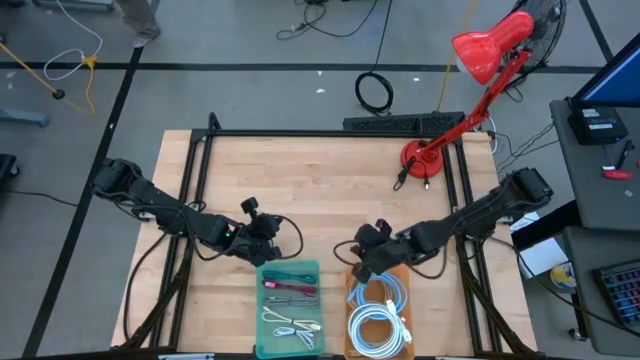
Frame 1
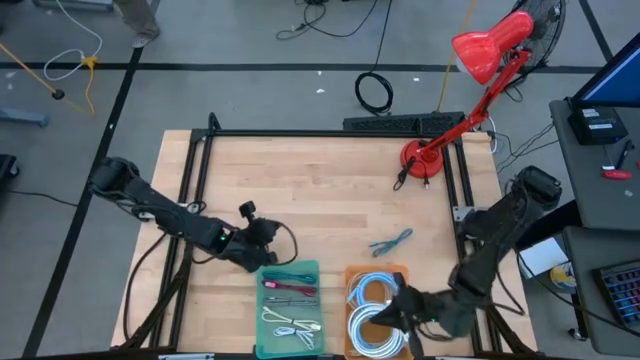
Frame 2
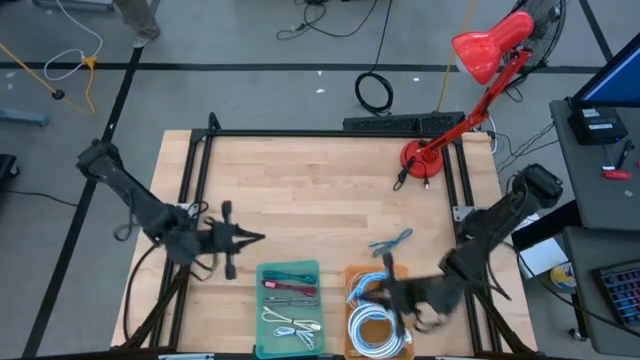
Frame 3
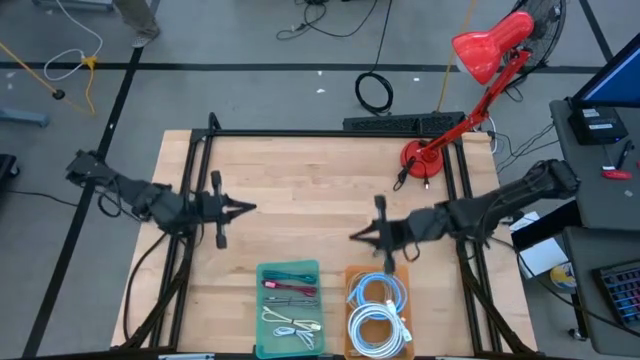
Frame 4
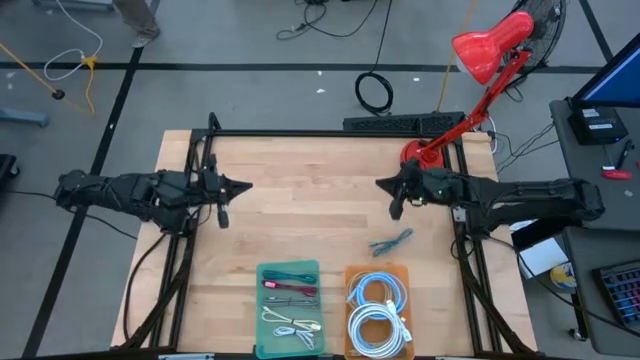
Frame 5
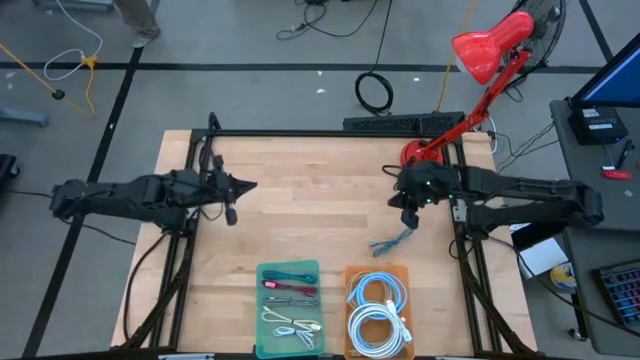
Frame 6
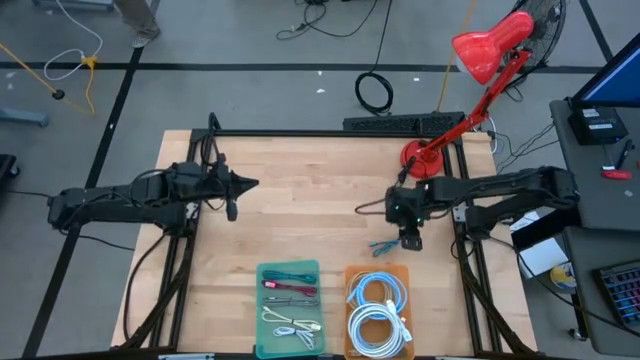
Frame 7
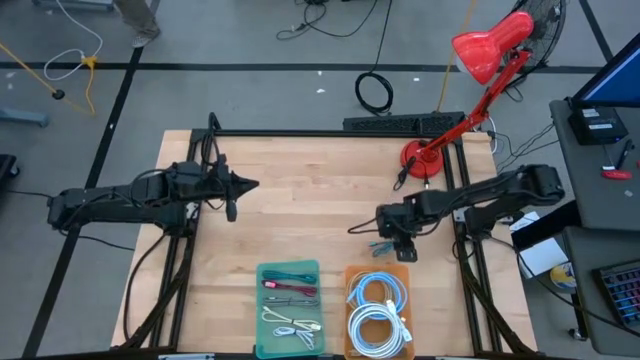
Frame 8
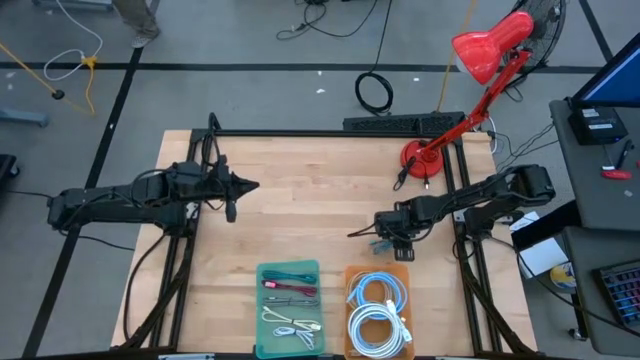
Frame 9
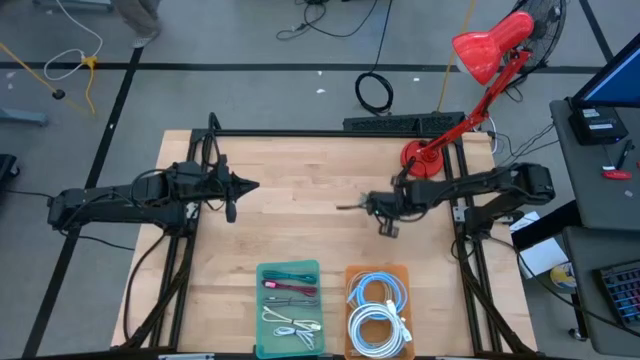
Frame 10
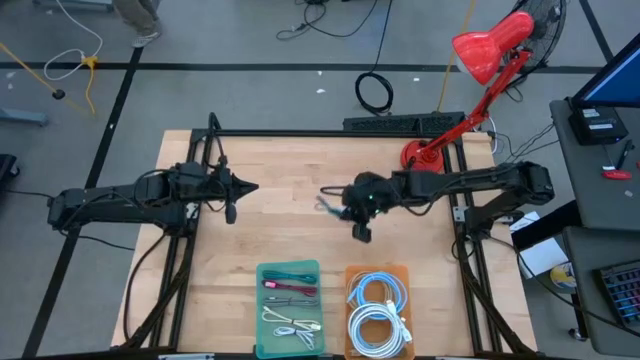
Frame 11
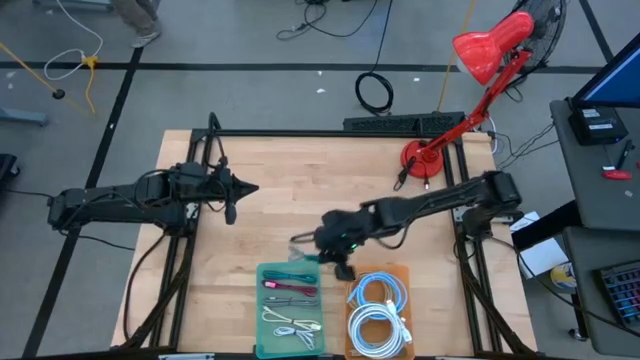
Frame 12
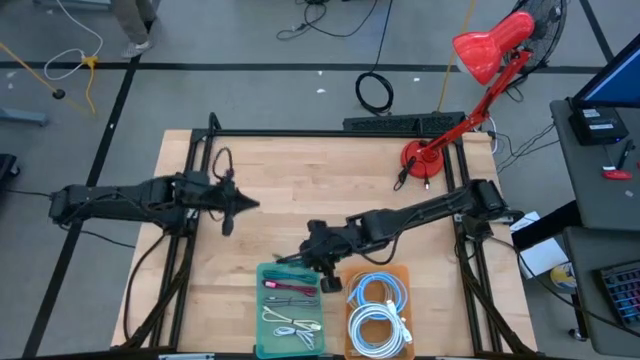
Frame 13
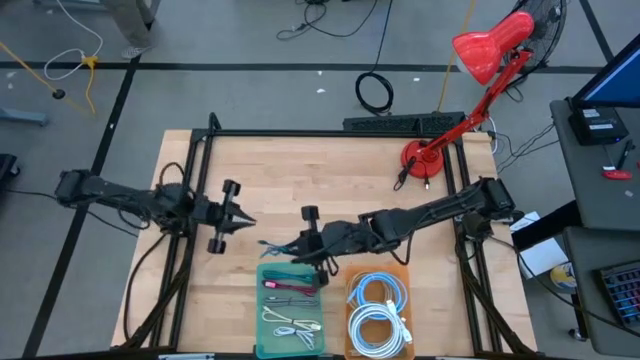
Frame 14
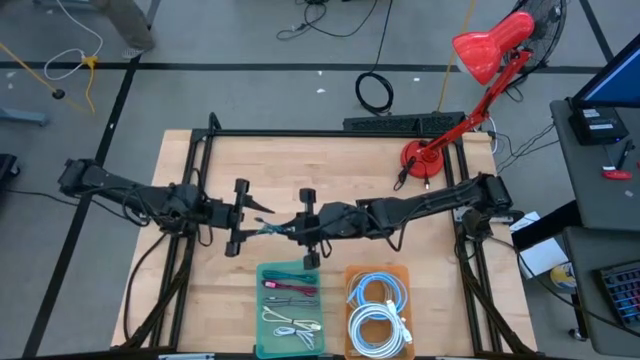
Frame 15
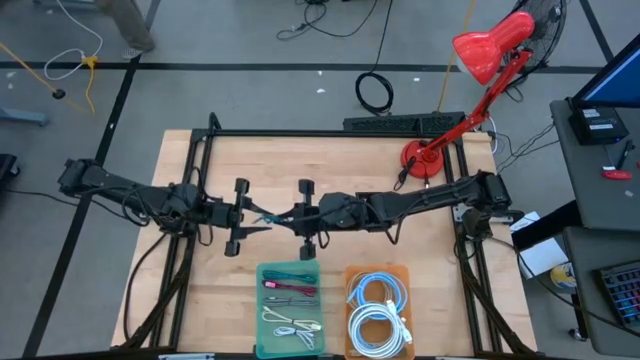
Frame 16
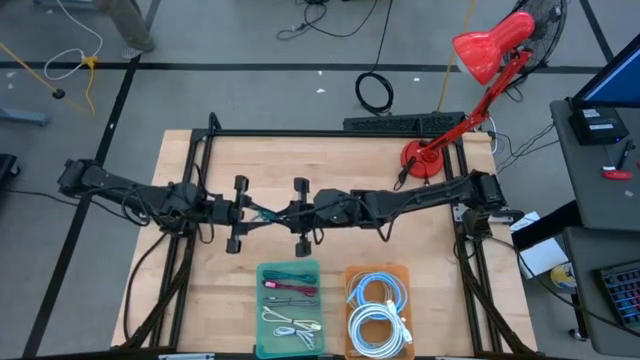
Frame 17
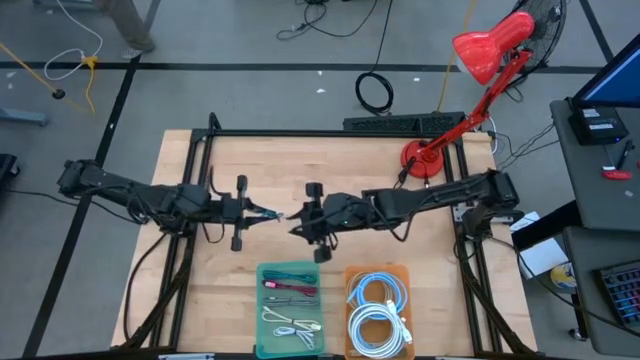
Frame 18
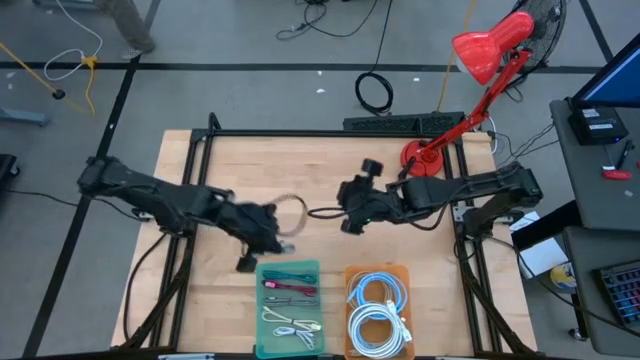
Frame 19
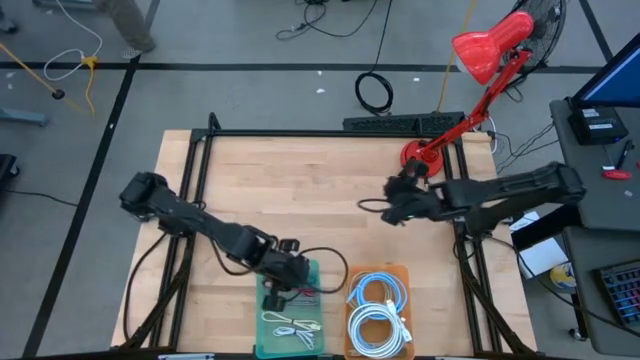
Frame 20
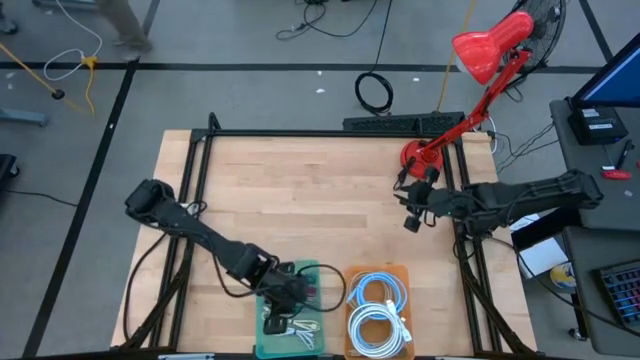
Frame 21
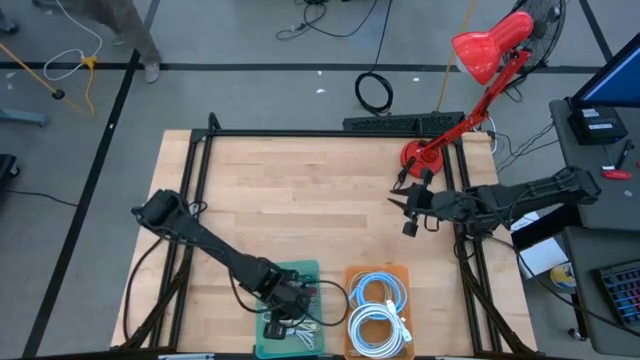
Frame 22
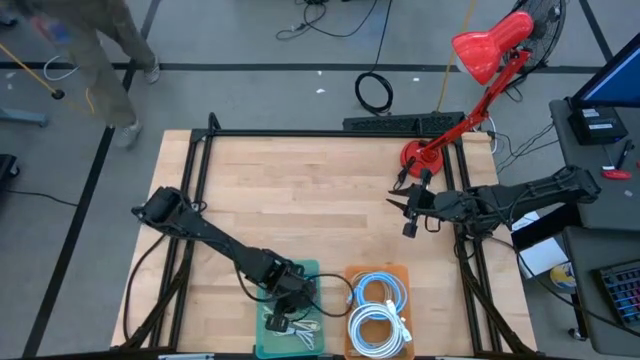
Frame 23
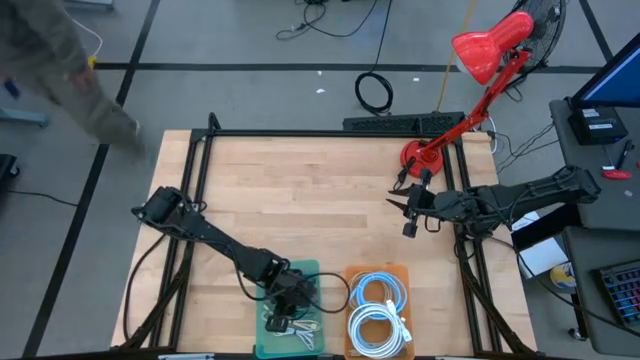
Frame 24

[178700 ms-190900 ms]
Task: Pick & Place USB Port
Put the blue charger cable into the green bin

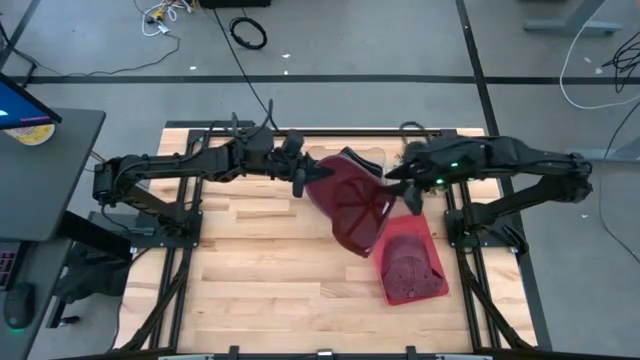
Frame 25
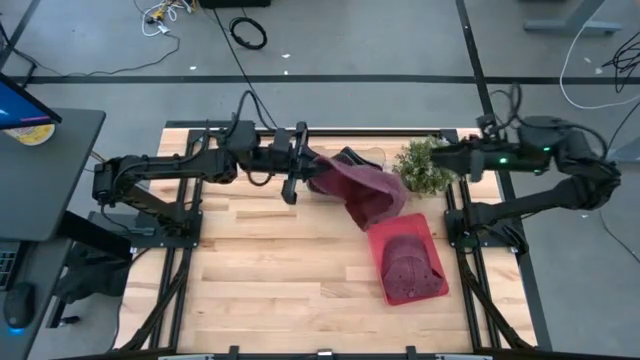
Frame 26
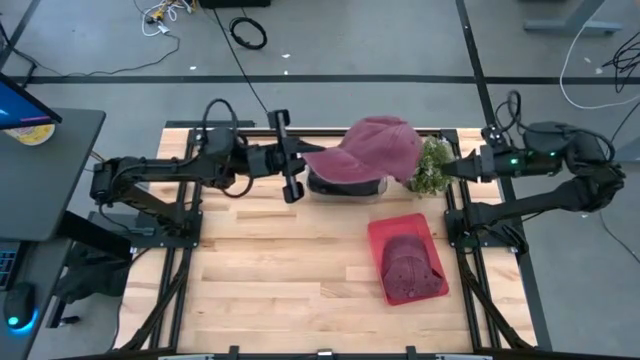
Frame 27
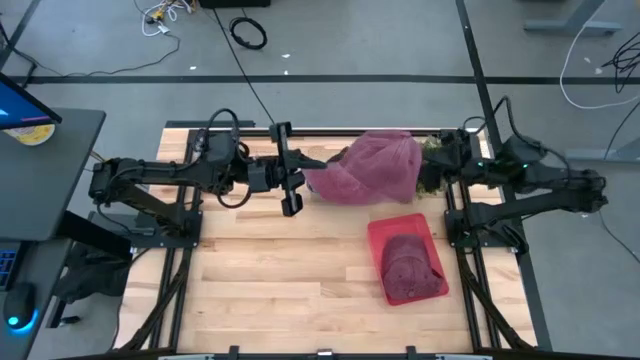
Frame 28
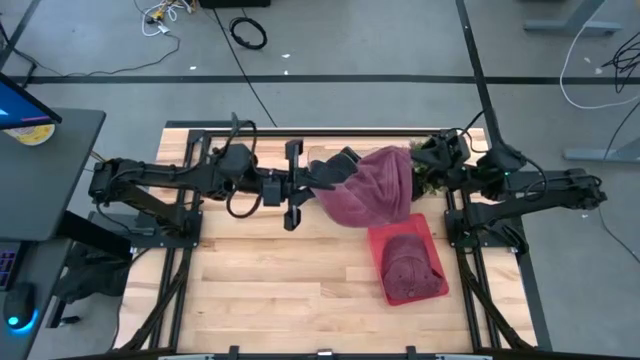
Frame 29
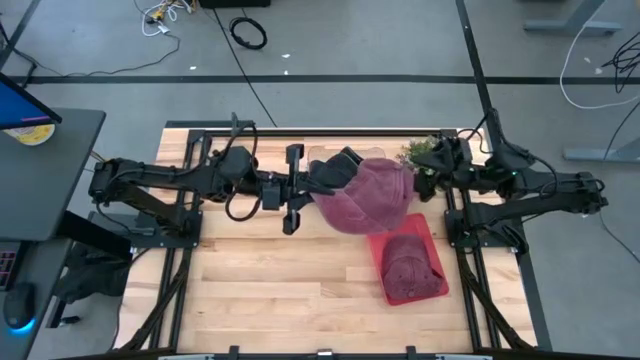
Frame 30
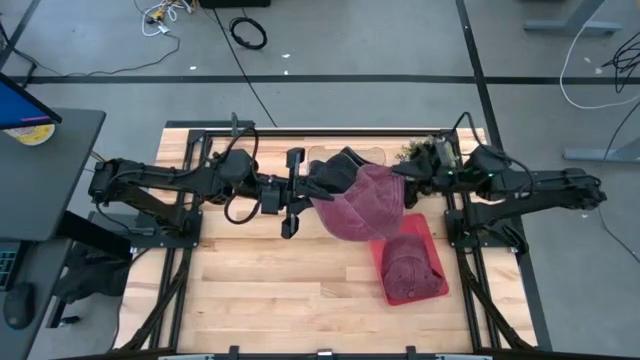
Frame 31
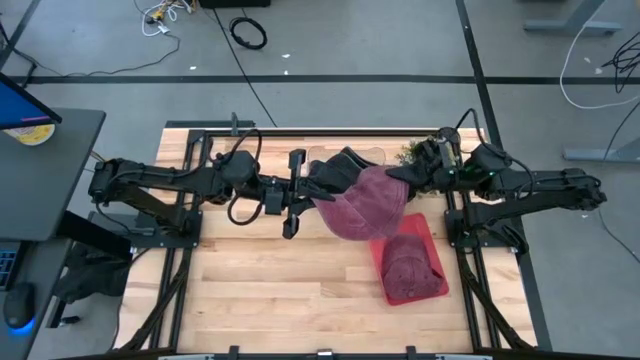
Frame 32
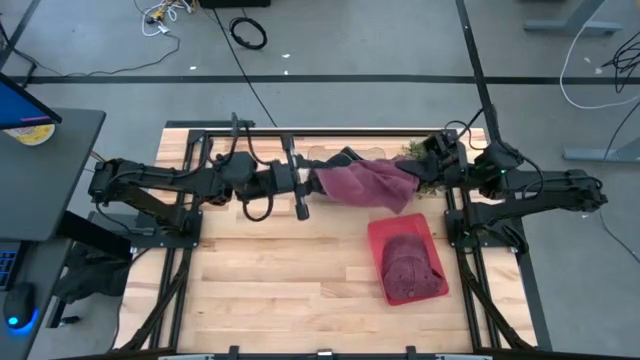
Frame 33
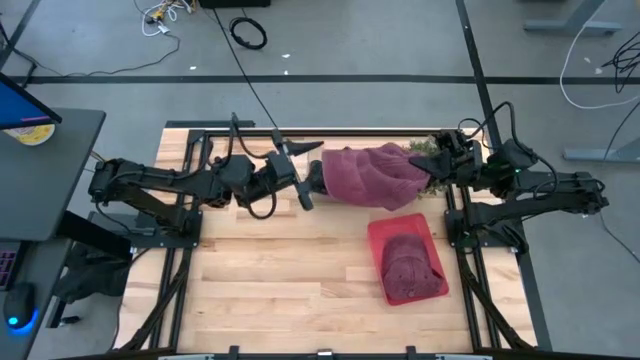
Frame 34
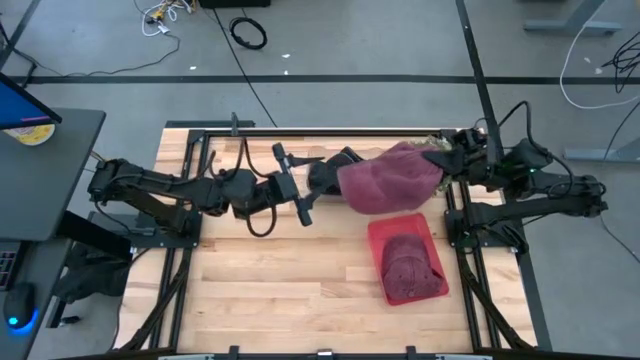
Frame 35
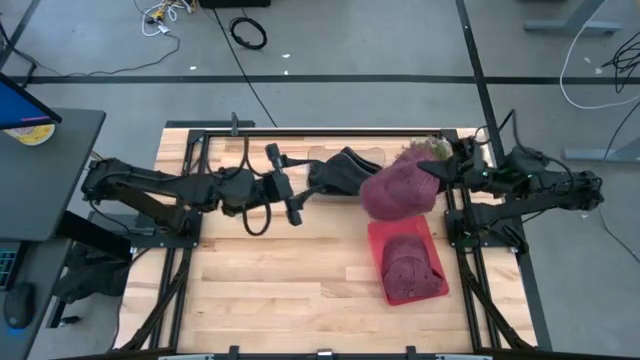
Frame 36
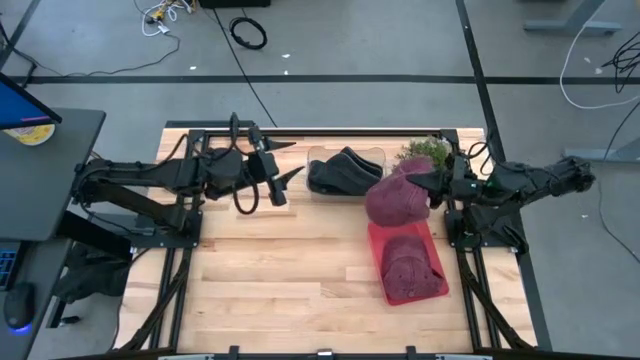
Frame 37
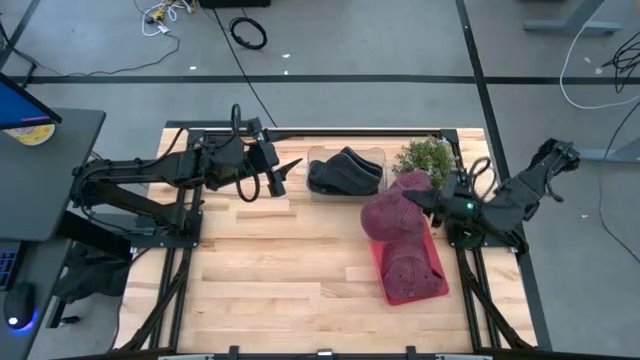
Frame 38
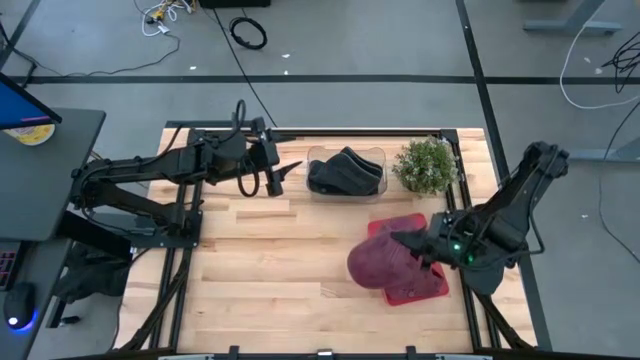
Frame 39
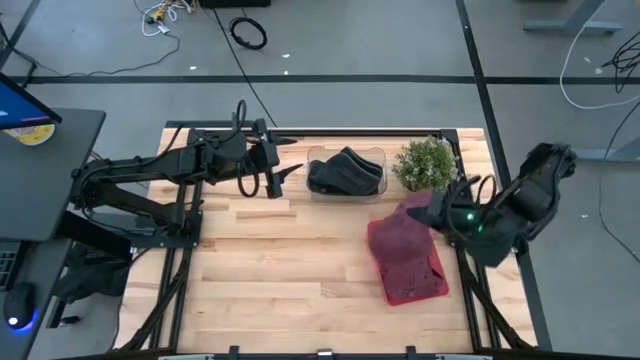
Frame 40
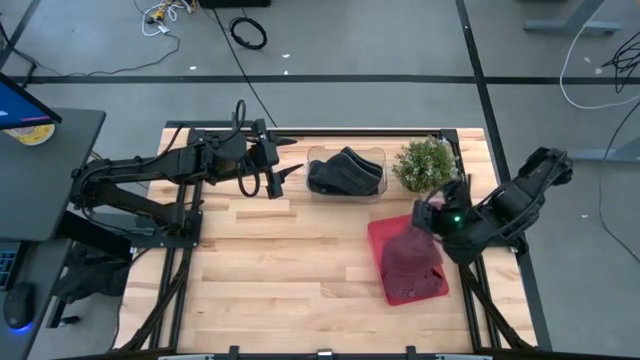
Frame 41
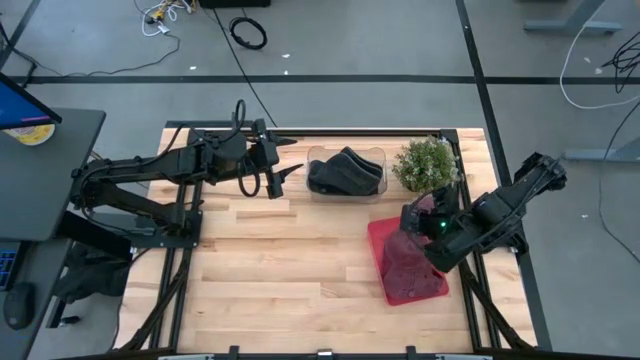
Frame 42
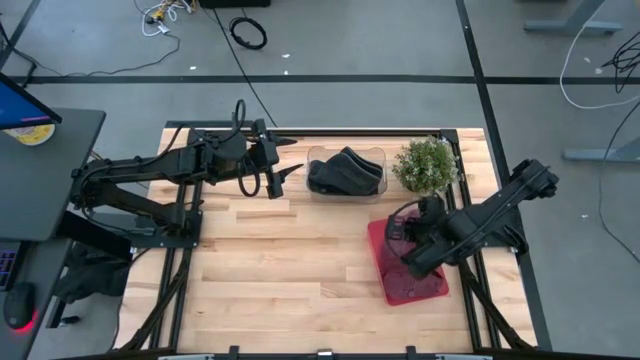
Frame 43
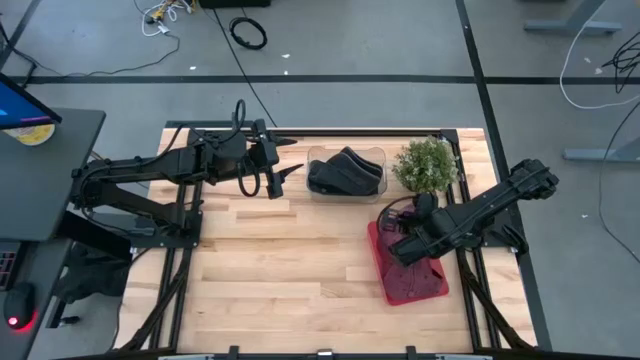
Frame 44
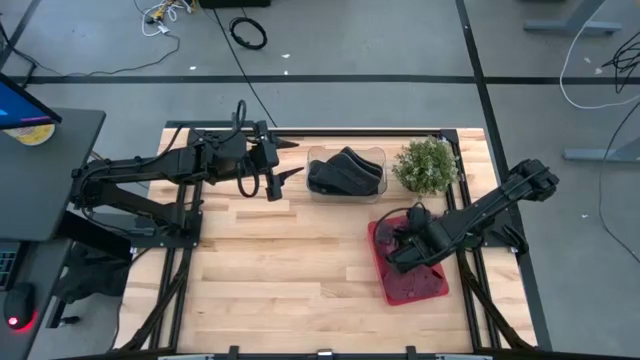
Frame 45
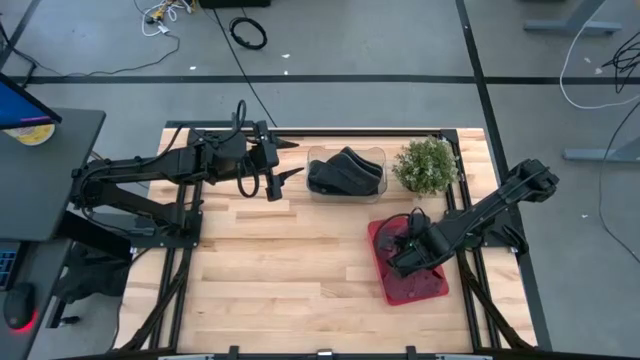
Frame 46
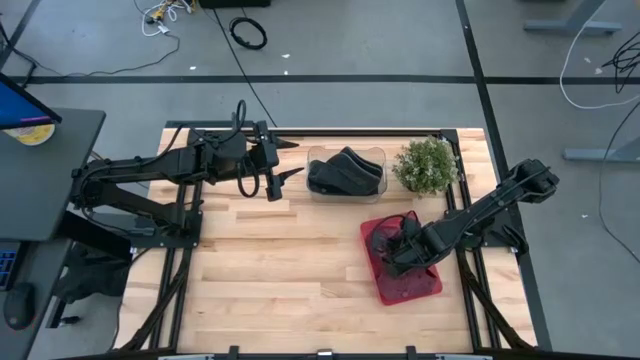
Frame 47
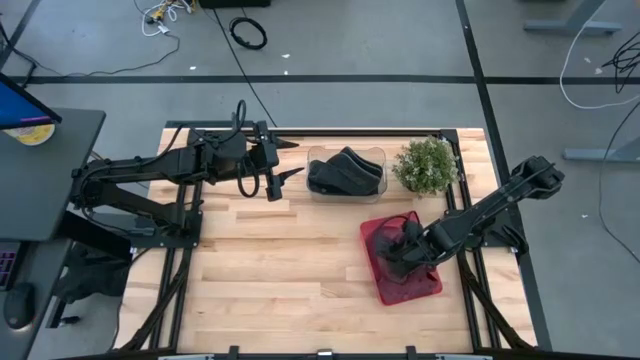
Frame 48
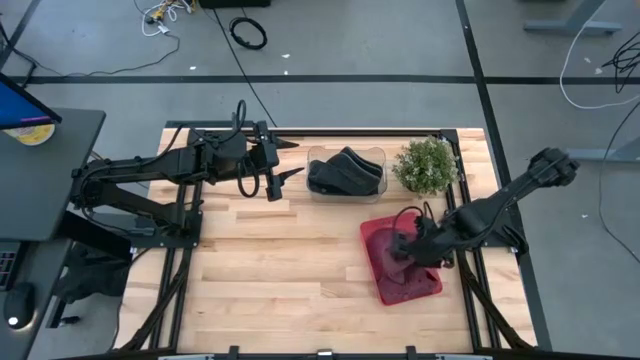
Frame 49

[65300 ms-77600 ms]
Task: Pick & Place hat
Put the red cap into the red bin
